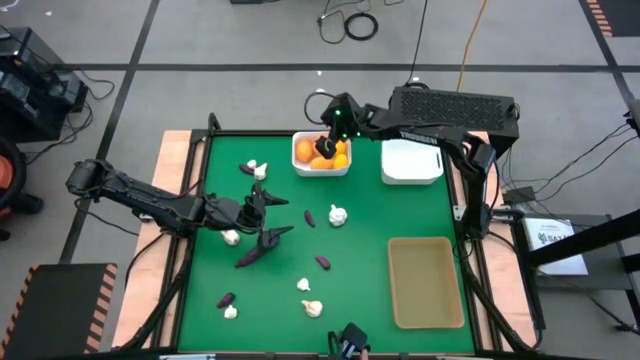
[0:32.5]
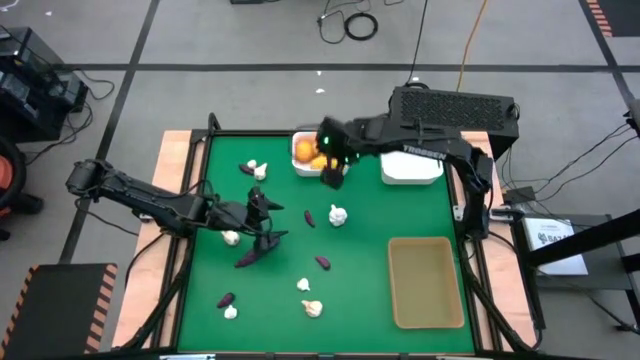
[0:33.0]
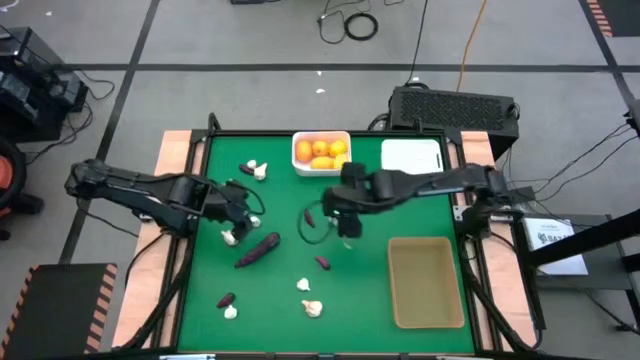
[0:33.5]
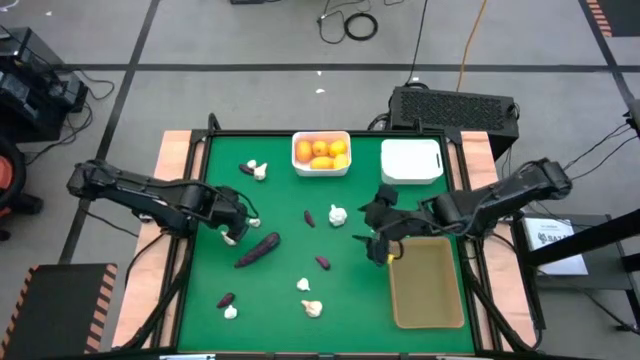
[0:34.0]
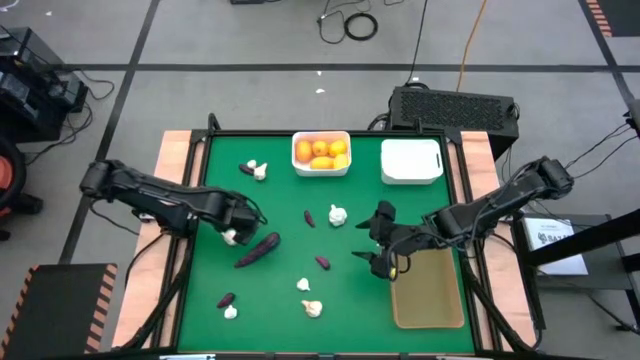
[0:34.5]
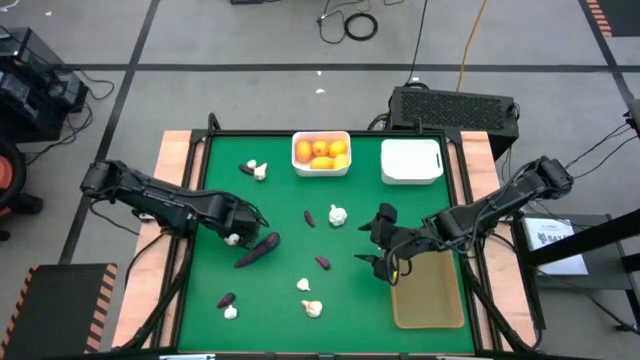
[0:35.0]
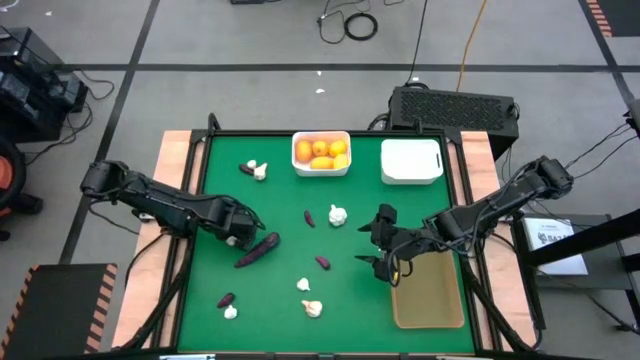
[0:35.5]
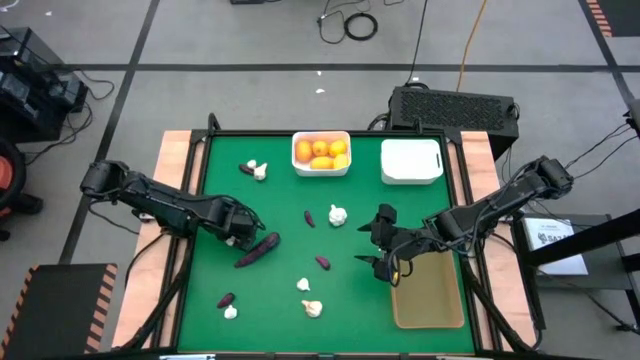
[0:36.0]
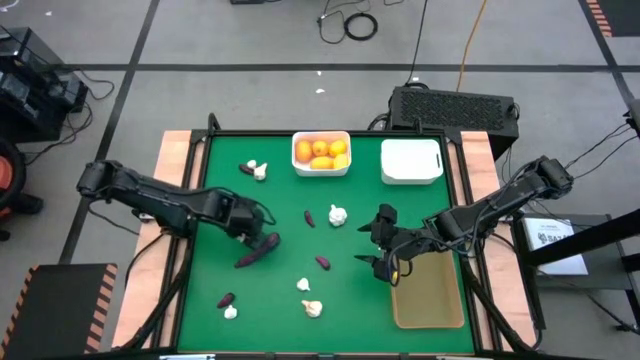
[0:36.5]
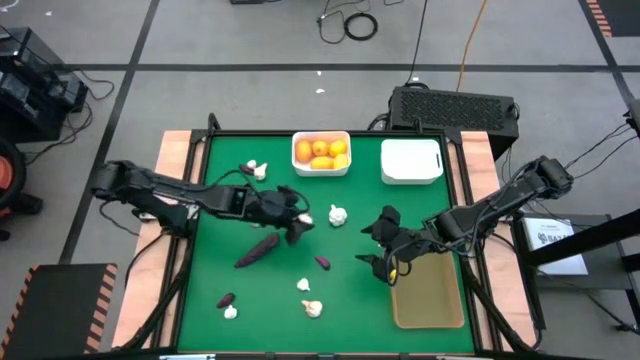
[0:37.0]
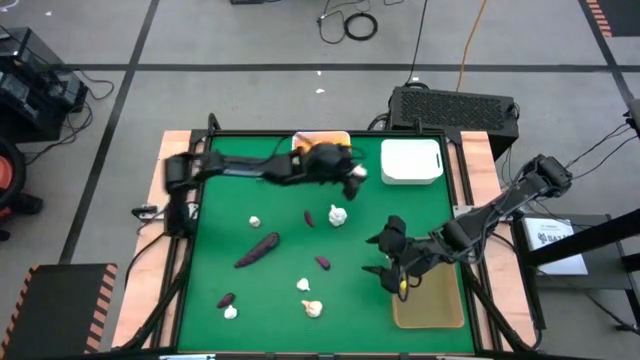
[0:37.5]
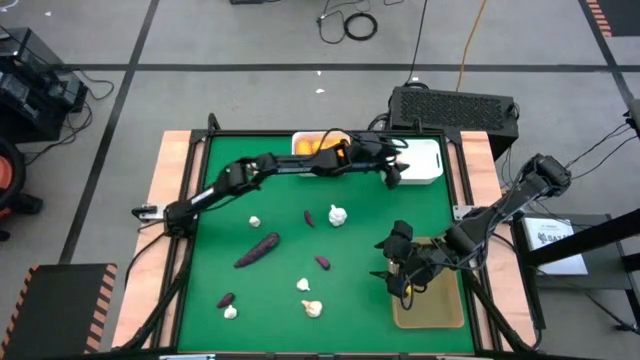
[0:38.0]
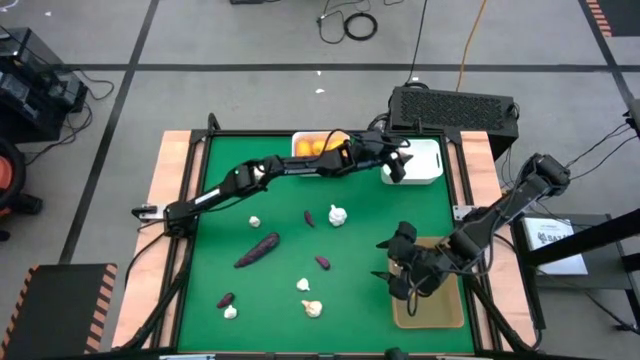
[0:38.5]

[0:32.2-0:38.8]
Task: Sort produce into baskets
Put the garlic into the right white bin

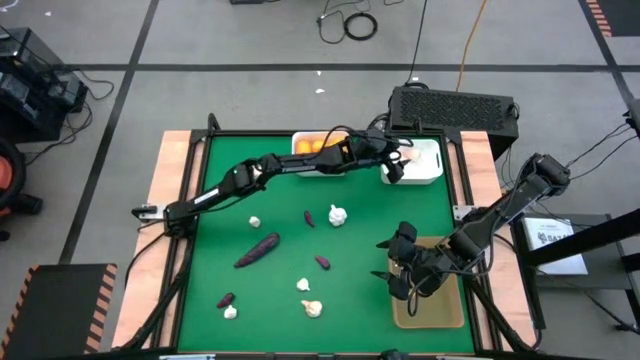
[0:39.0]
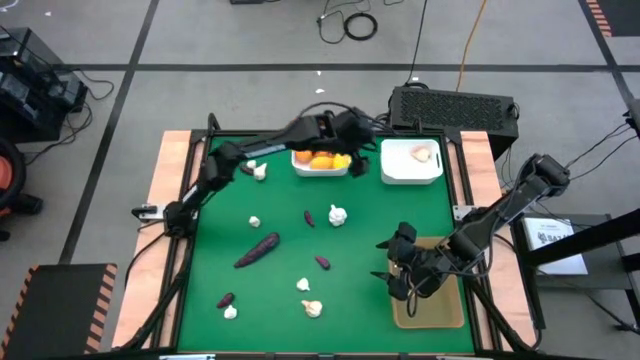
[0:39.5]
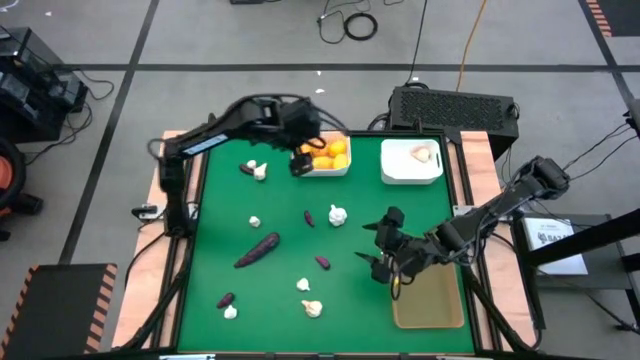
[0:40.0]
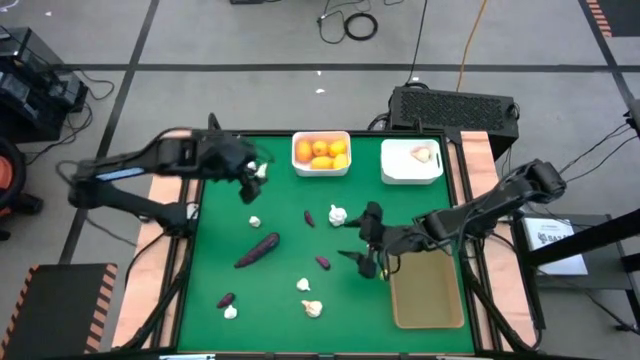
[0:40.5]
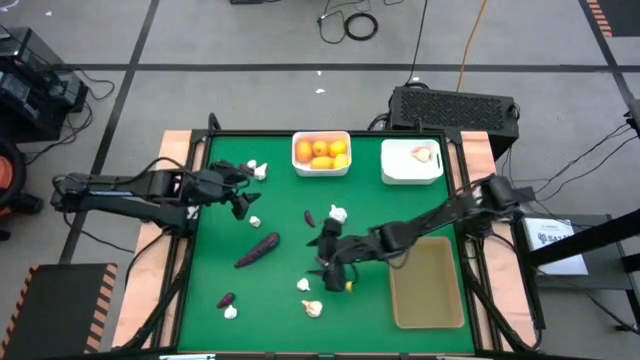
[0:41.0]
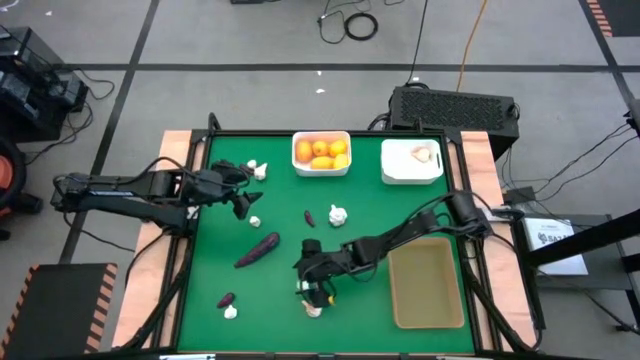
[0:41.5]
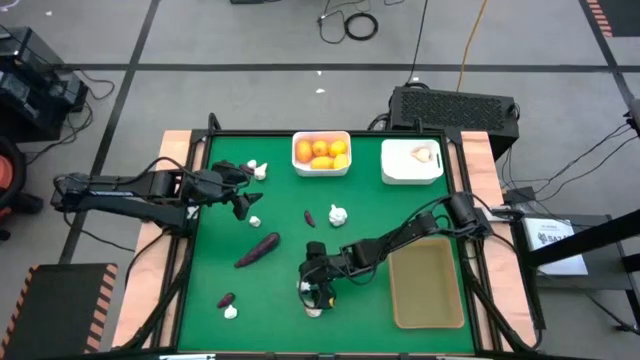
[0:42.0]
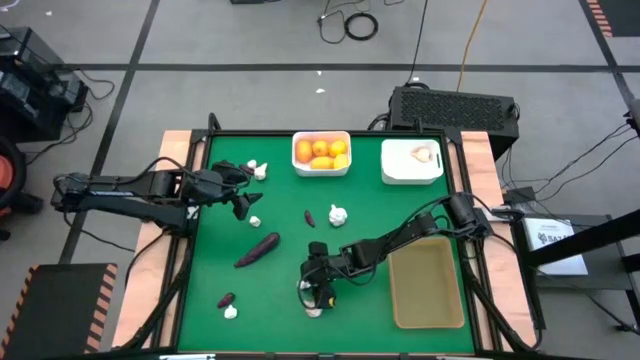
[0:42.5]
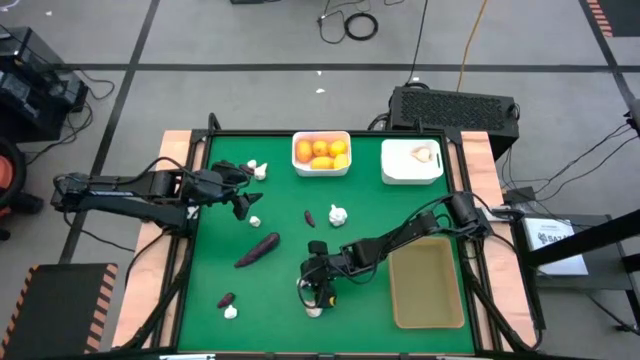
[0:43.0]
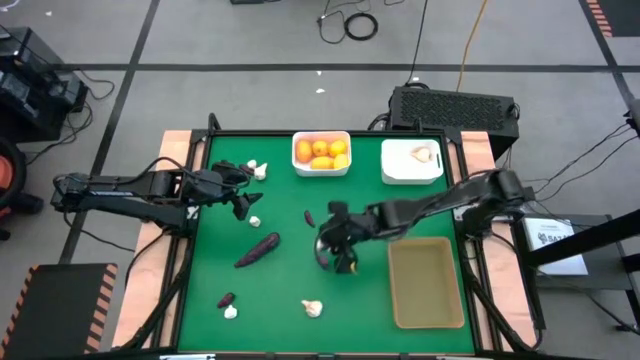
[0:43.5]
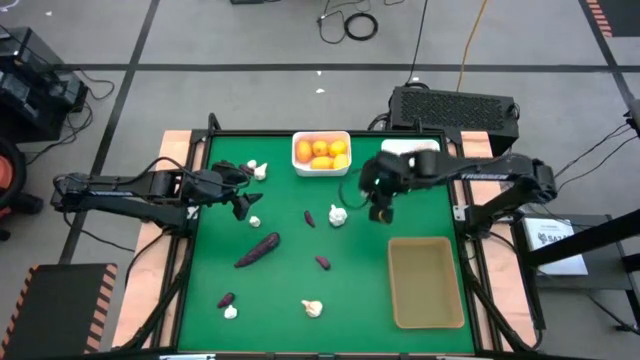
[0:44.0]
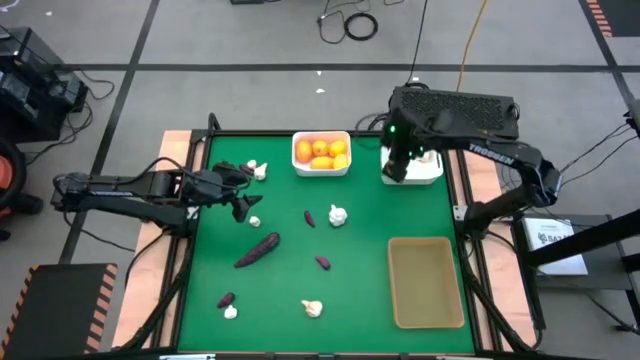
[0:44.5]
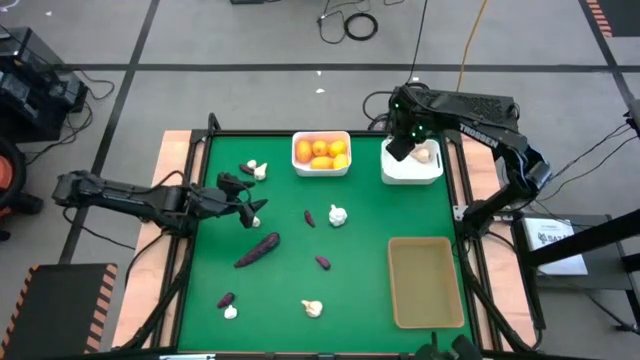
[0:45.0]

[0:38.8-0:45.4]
Put the garlic into the right white bin

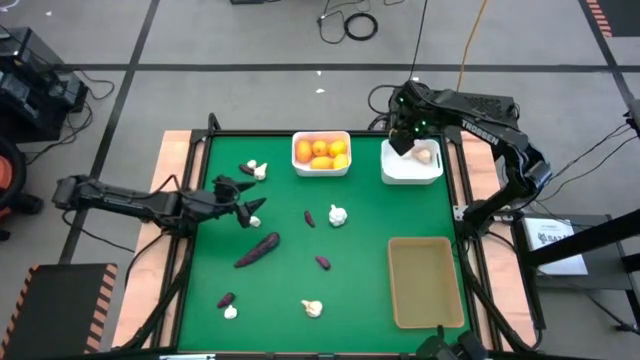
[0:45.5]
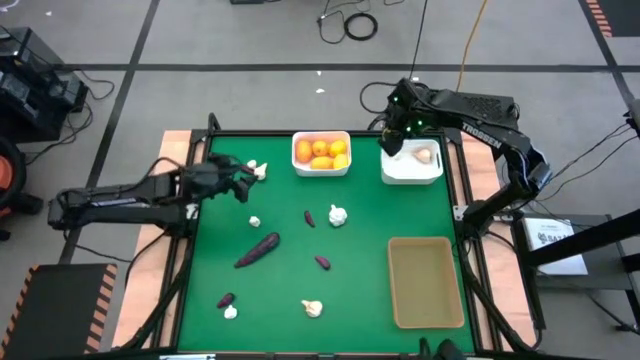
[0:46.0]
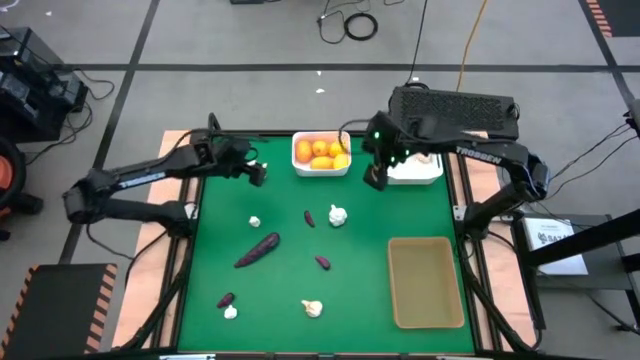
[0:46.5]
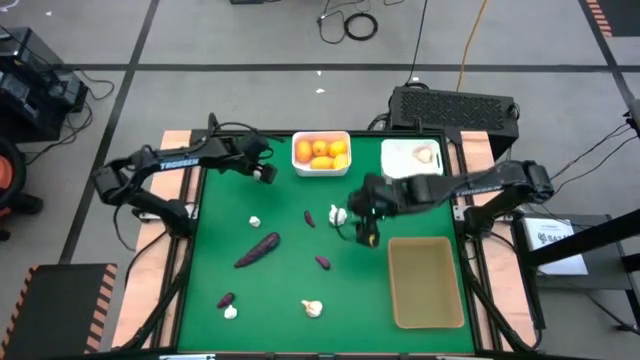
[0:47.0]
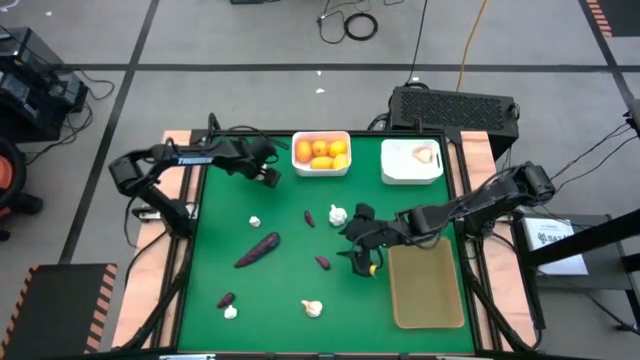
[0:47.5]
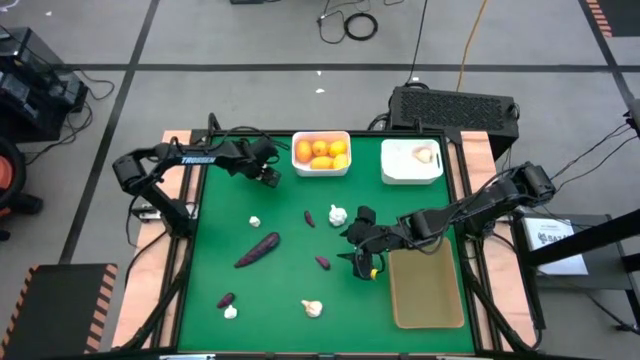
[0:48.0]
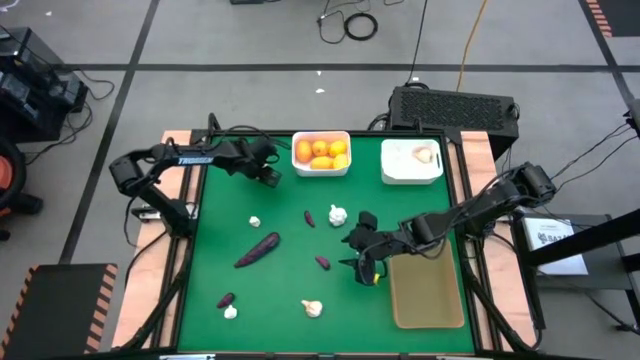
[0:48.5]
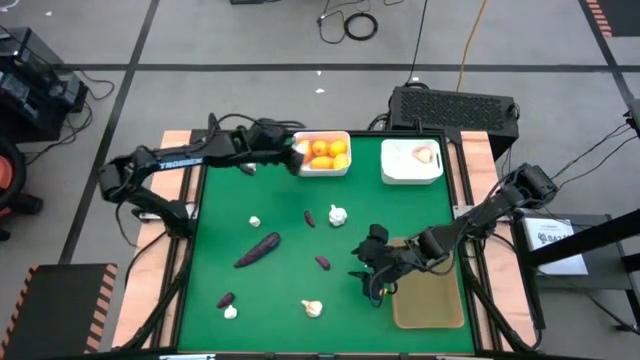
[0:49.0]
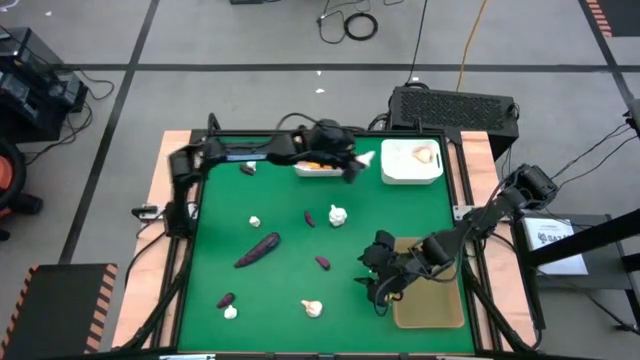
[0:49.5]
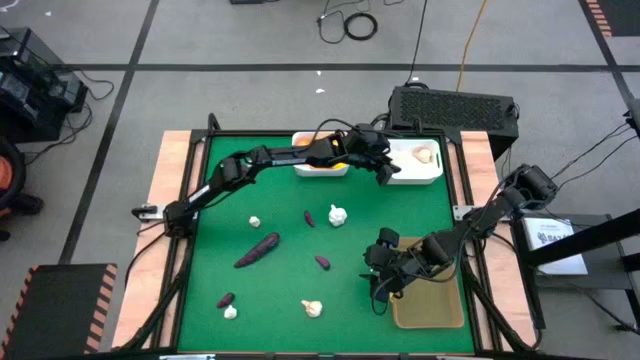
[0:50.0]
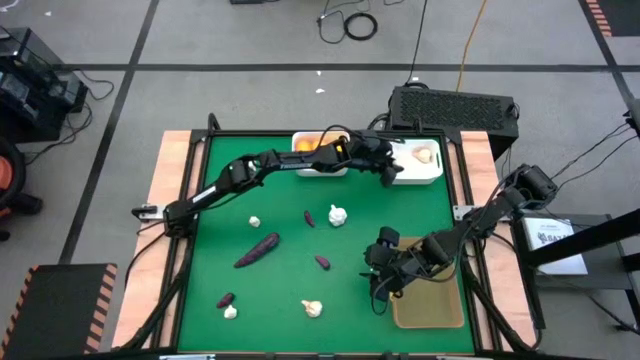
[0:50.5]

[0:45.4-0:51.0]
Put the garlic into the right white bin

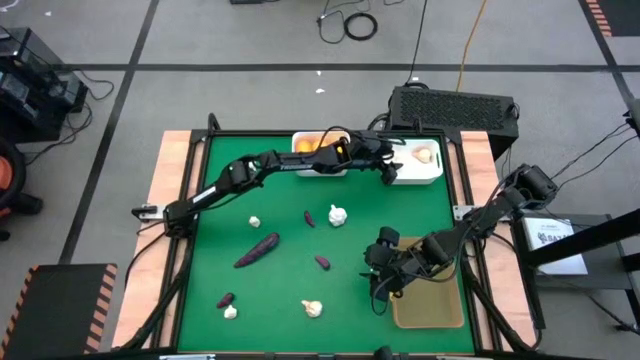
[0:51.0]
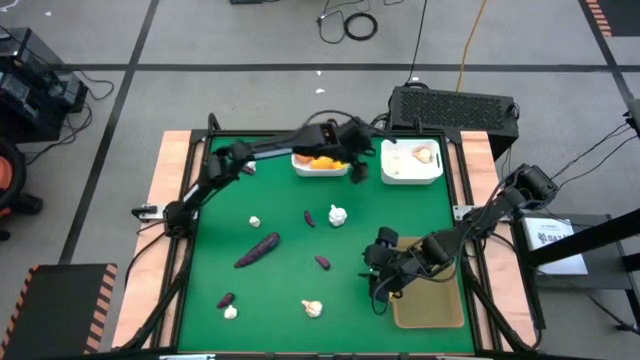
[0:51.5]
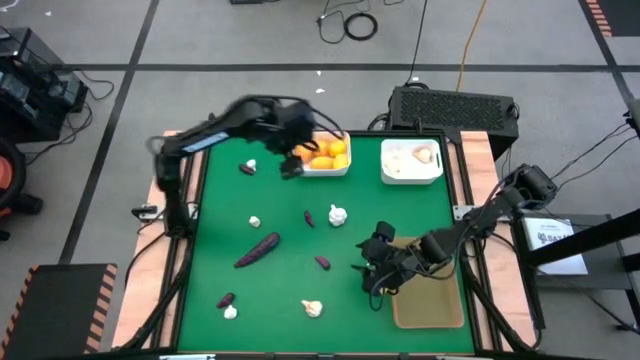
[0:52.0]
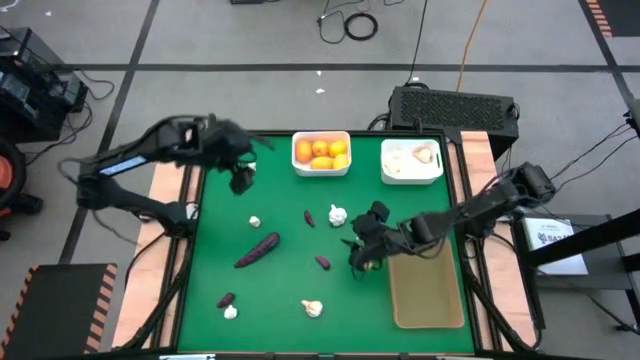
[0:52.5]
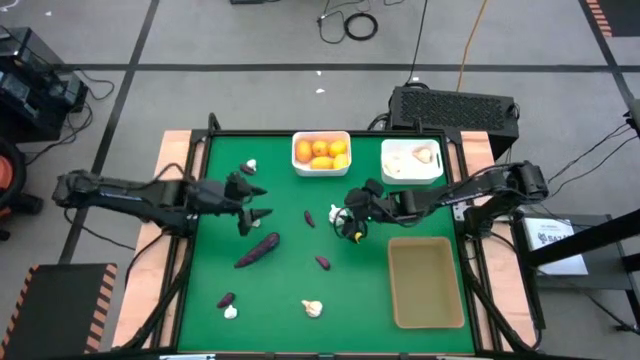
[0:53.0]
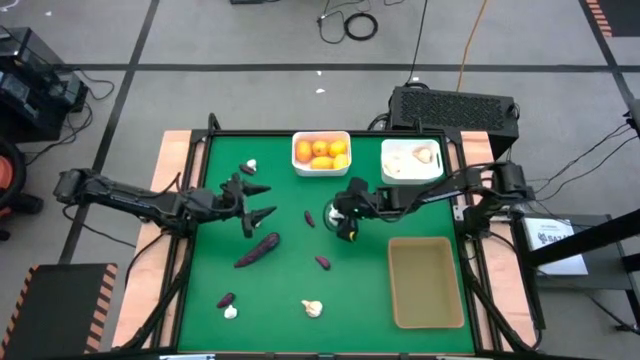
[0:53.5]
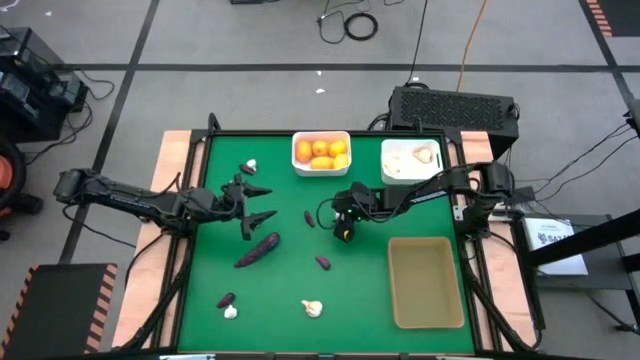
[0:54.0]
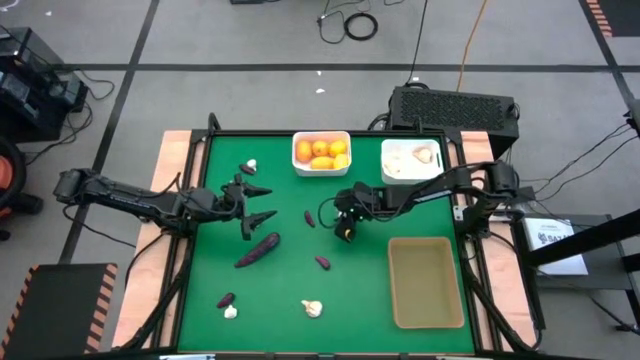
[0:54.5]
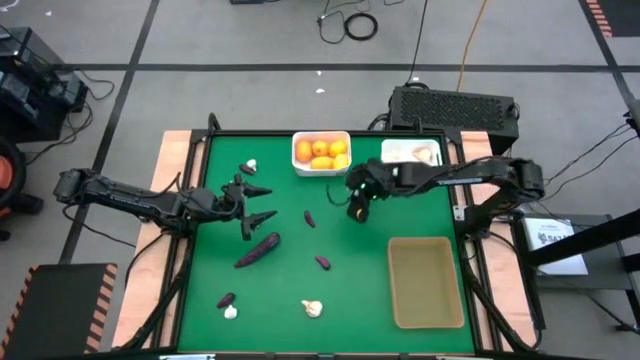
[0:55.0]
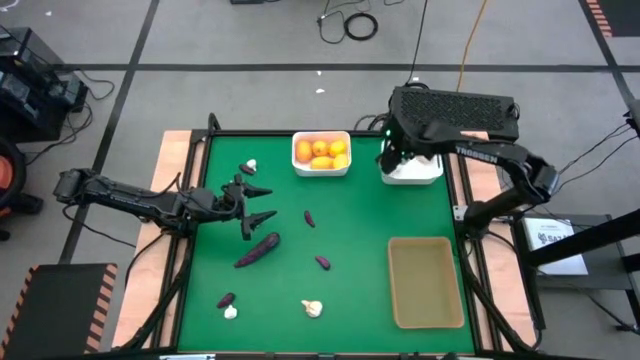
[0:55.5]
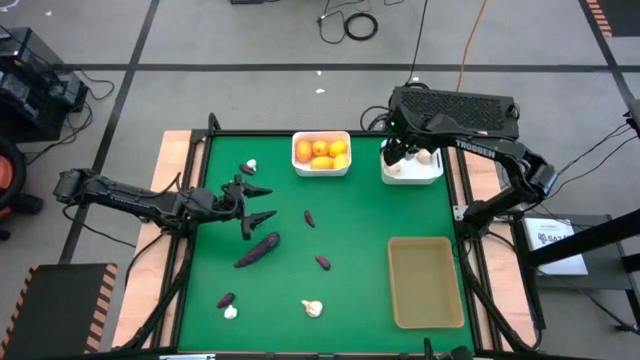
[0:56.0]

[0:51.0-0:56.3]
Put the garlic into the right white bin
